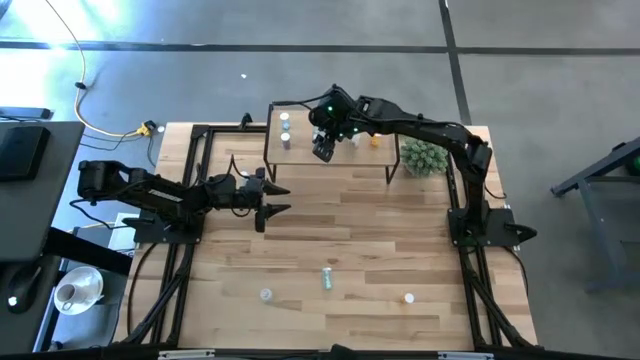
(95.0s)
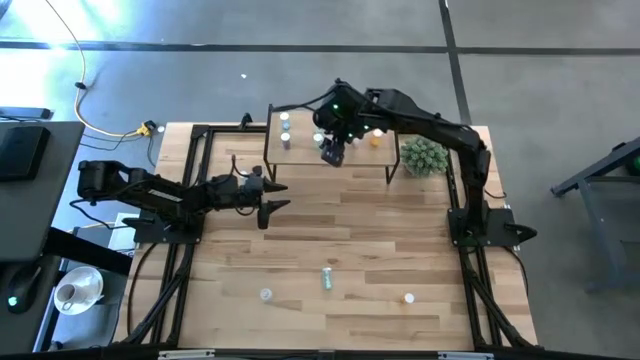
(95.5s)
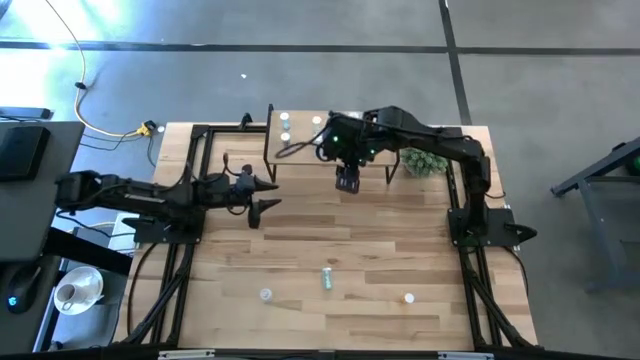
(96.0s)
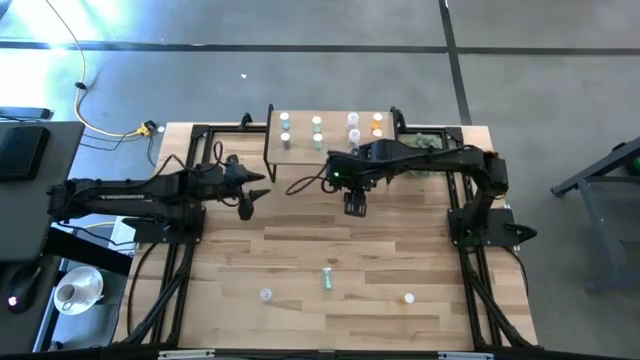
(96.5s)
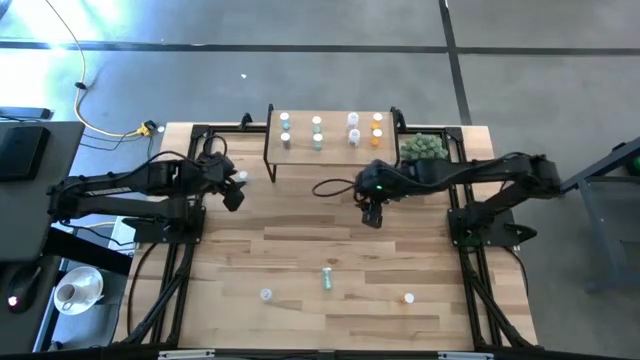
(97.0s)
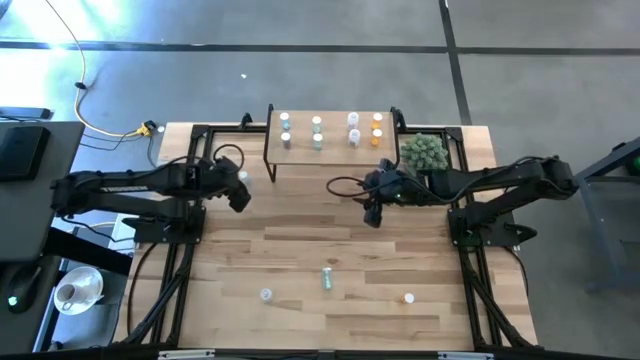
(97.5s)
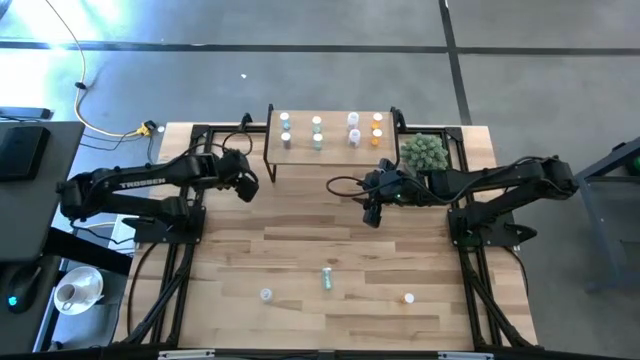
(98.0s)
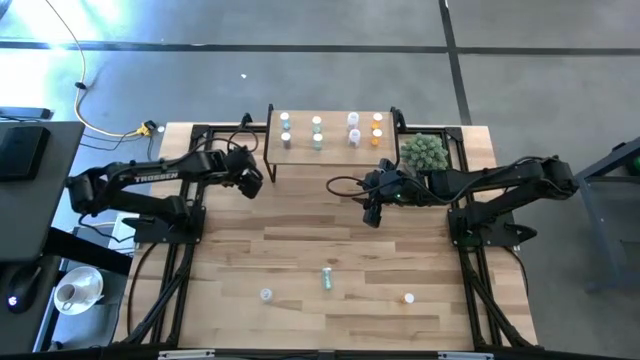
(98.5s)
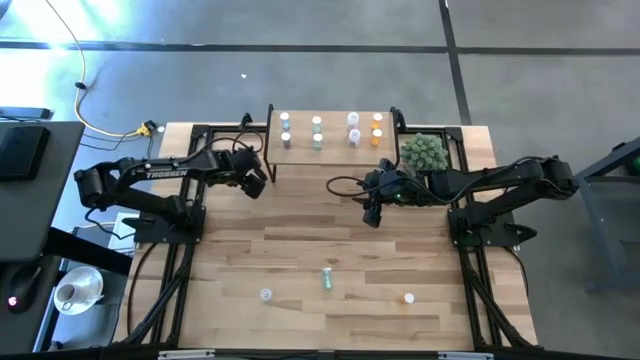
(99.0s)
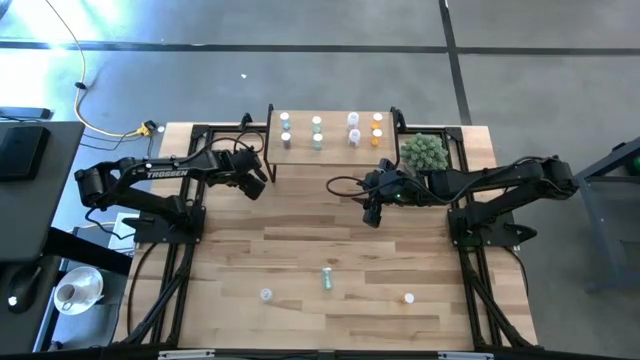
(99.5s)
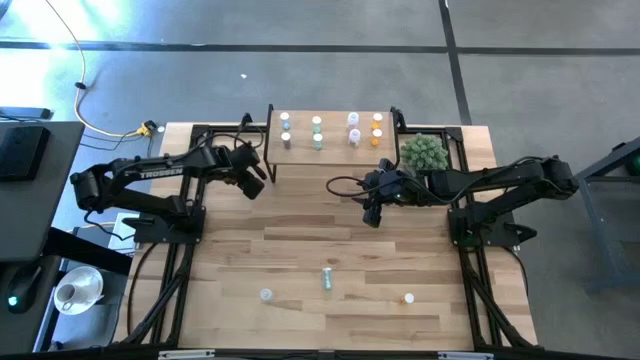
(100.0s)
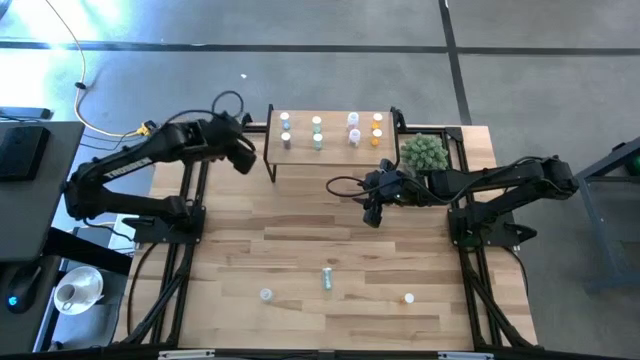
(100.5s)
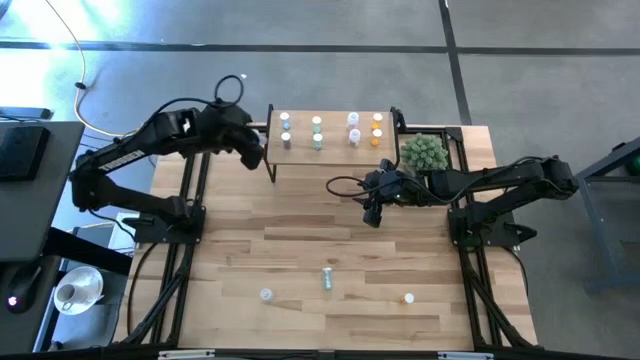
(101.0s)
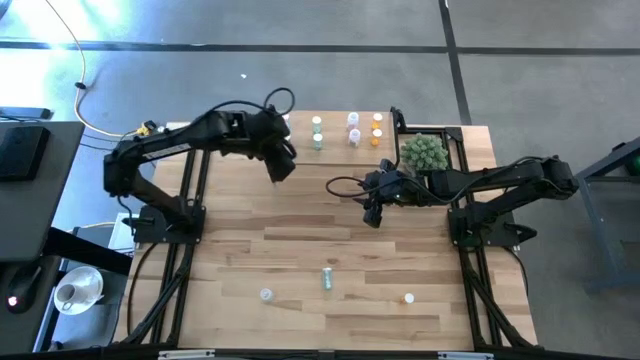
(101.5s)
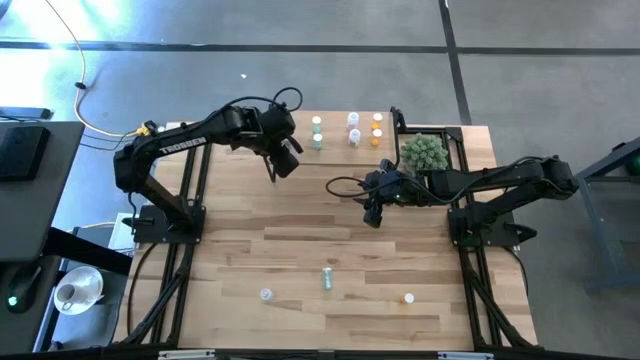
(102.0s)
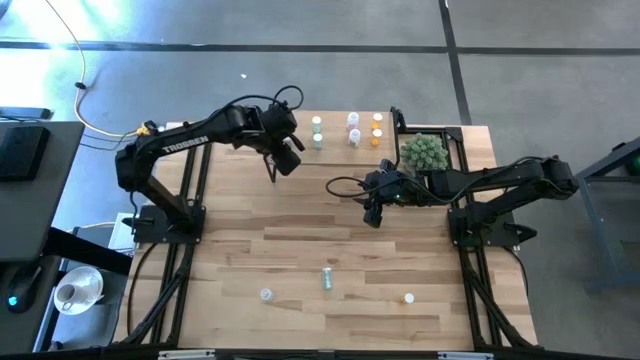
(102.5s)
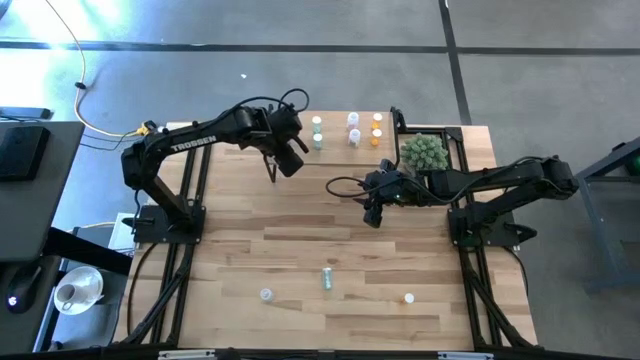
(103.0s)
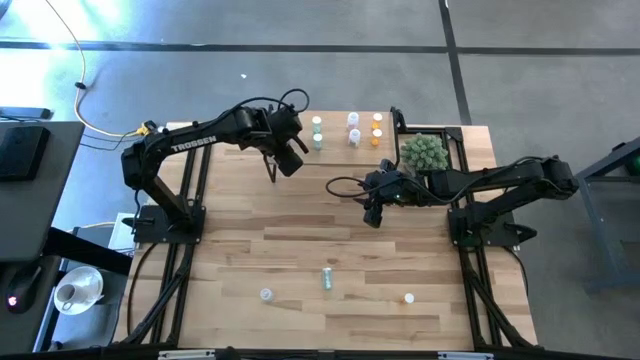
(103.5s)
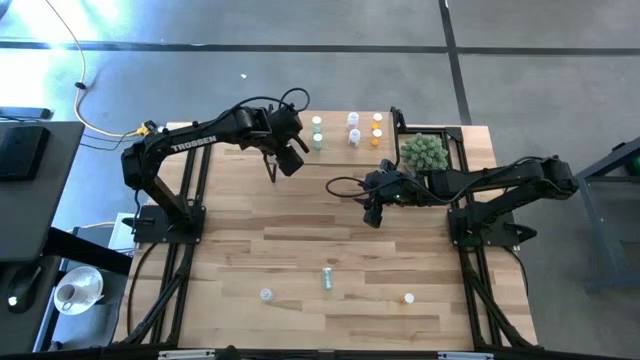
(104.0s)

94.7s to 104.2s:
Task: Pick and place medicine bottles onto shelf by color
Put the blue pill bottle on the shelf aligned with the other blue pill bottles

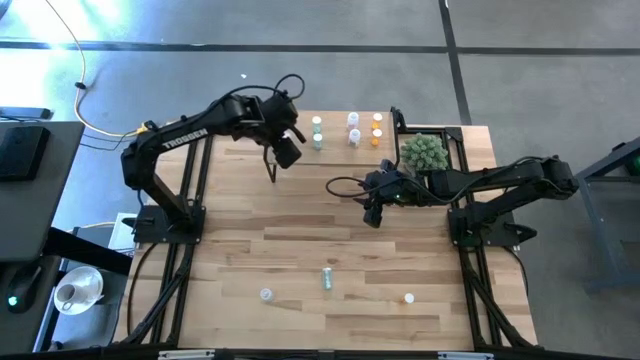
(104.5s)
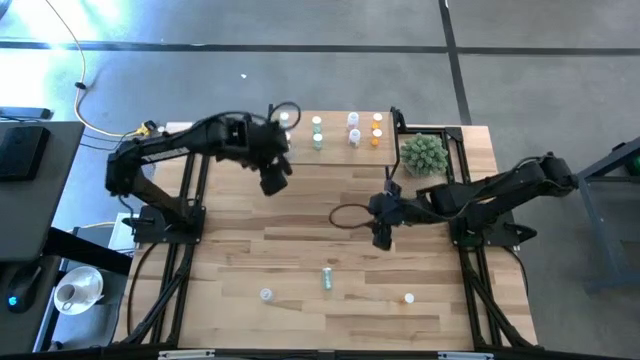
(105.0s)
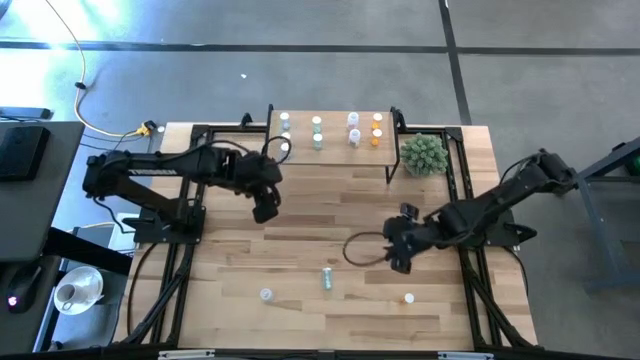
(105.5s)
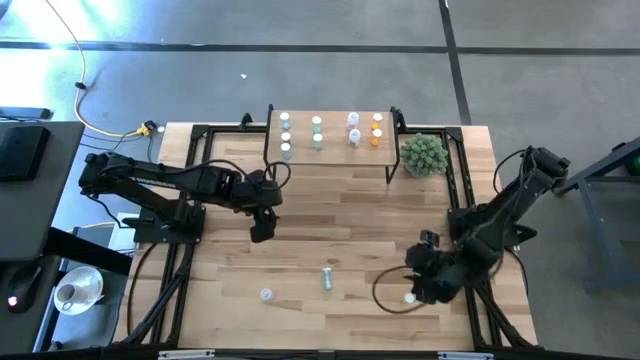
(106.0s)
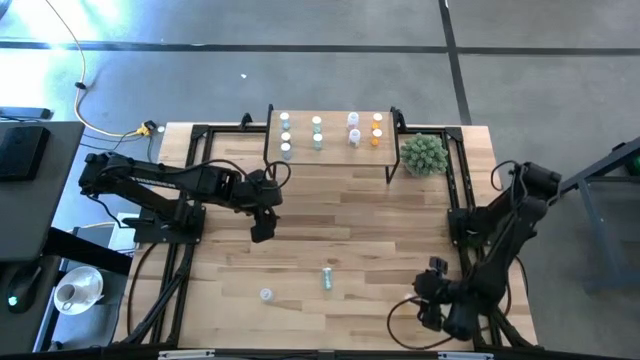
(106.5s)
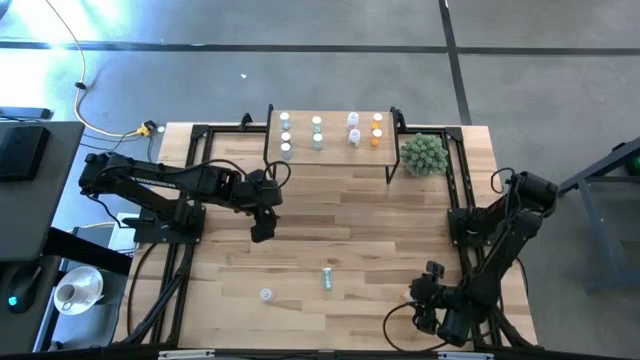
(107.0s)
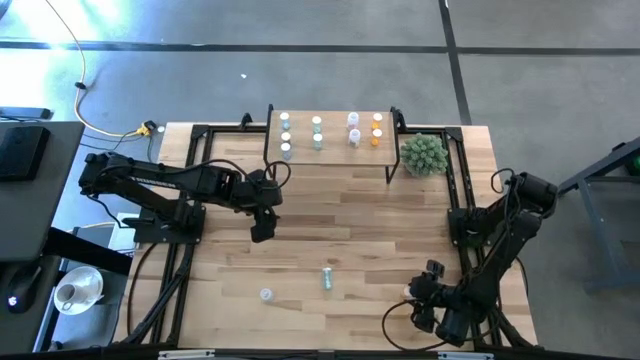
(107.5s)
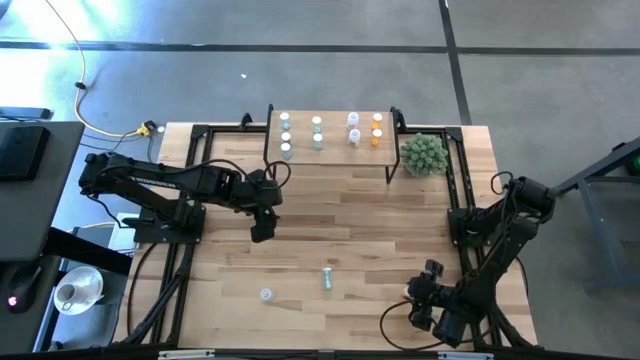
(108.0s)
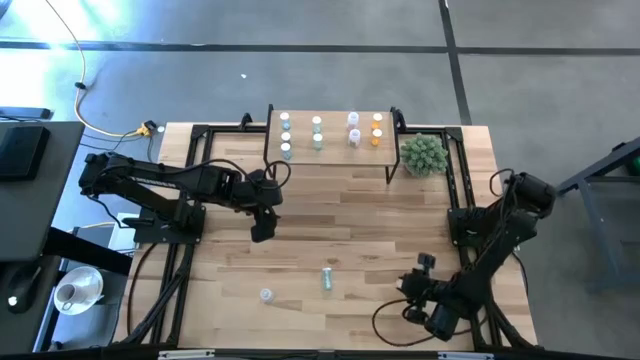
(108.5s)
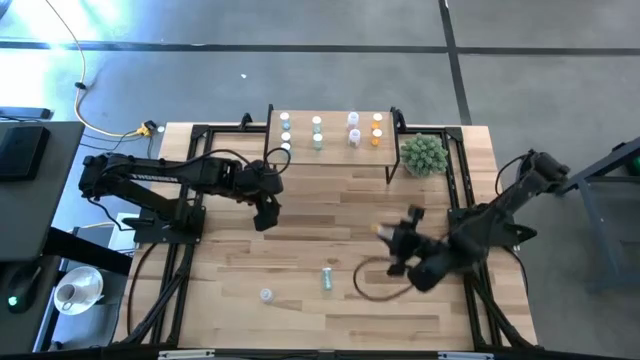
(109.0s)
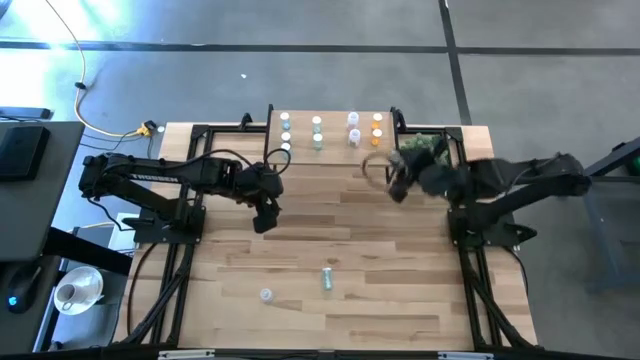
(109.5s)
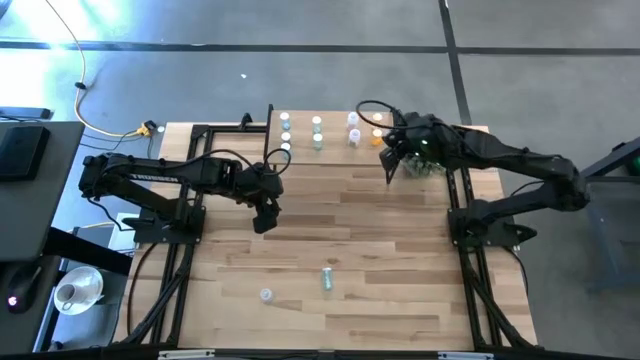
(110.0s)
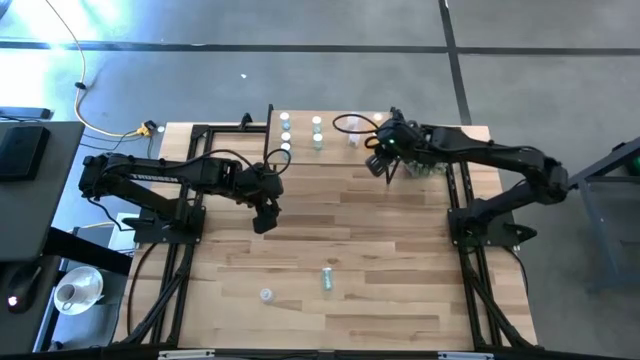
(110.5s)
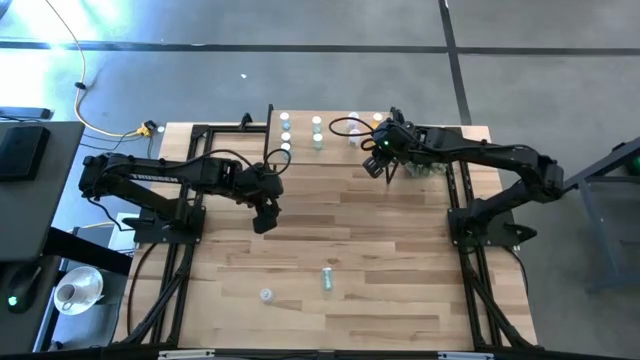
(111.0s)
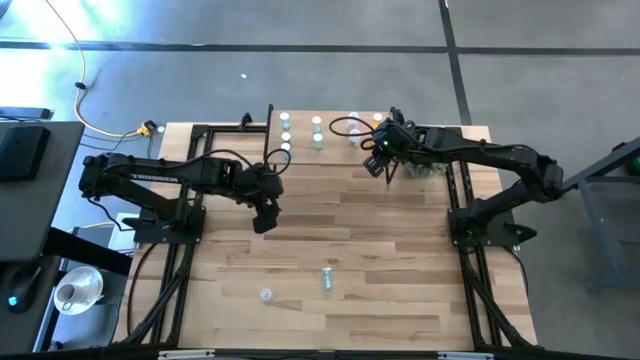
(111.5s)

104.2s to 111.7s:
Put the orange pill bottle on the shelf aligned with the other orange pill bottles

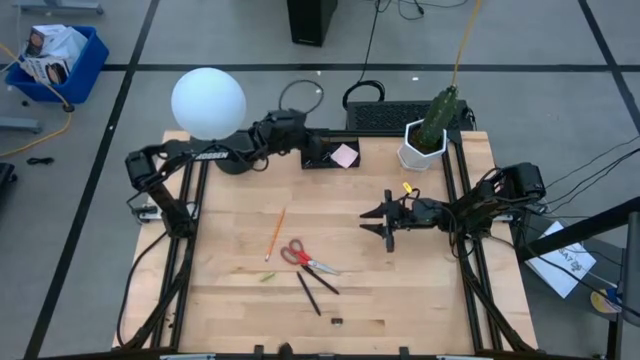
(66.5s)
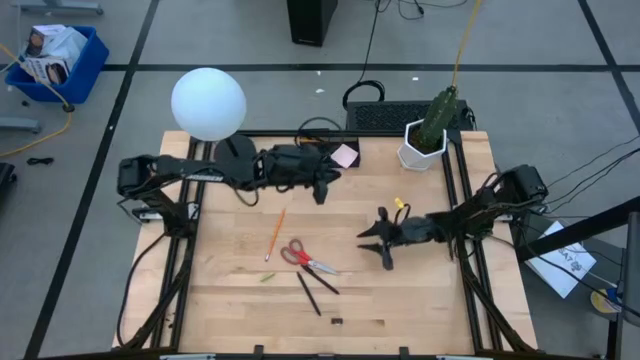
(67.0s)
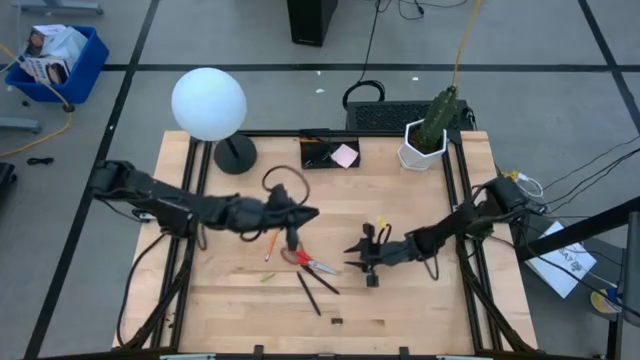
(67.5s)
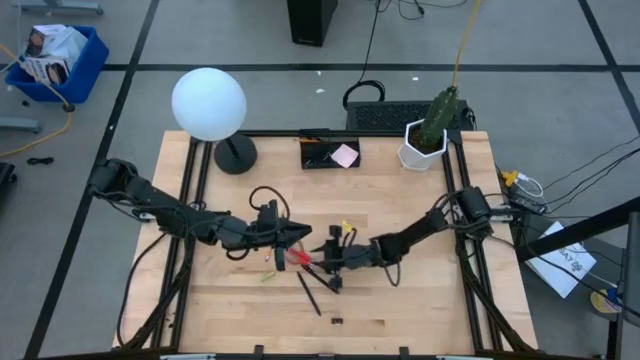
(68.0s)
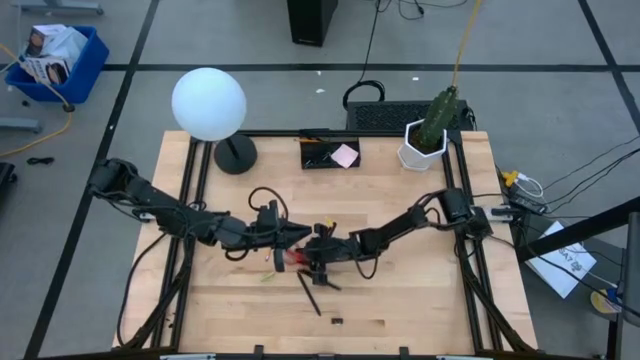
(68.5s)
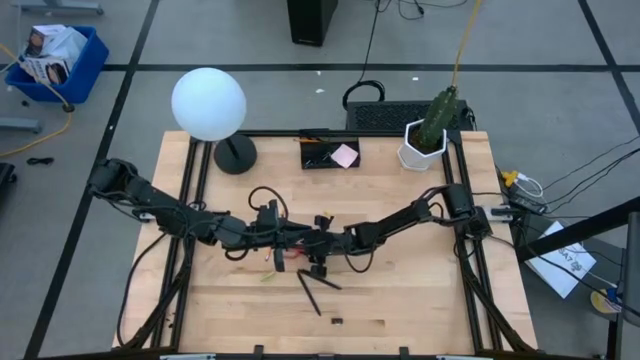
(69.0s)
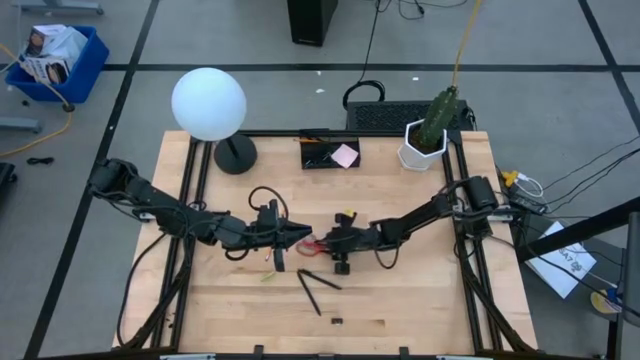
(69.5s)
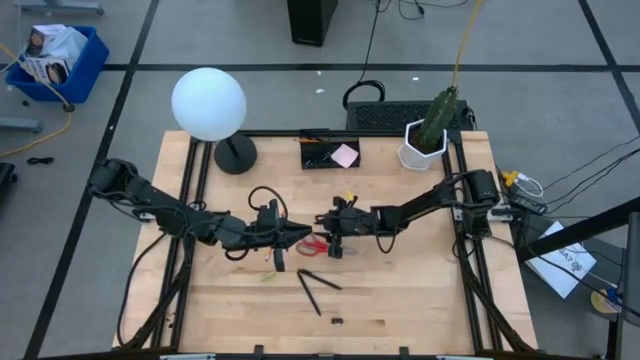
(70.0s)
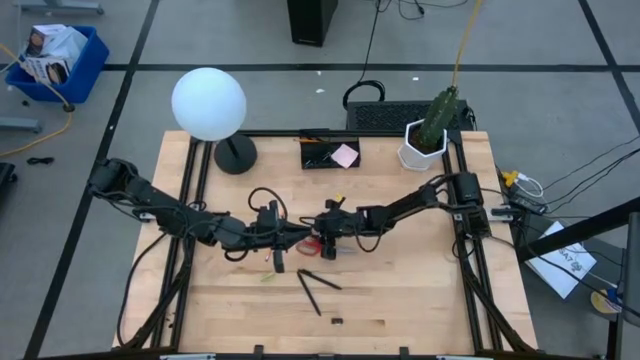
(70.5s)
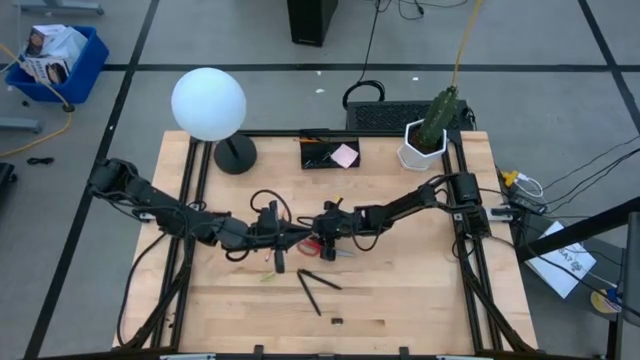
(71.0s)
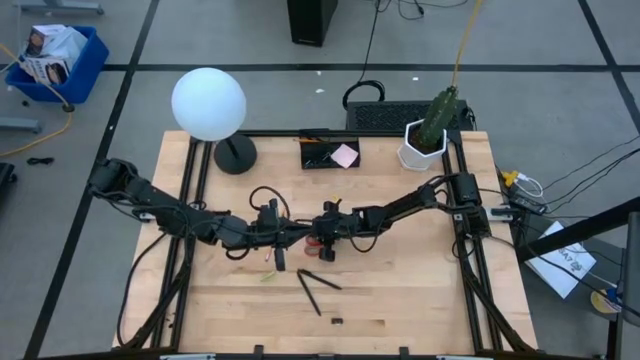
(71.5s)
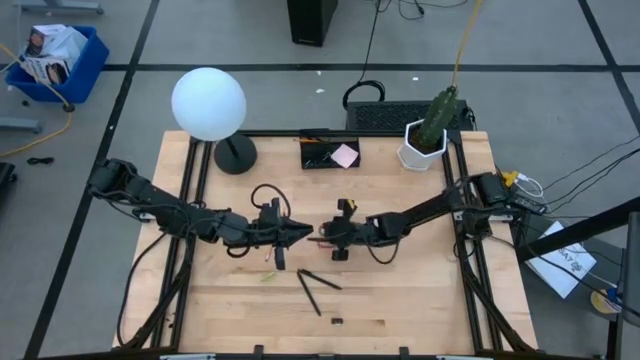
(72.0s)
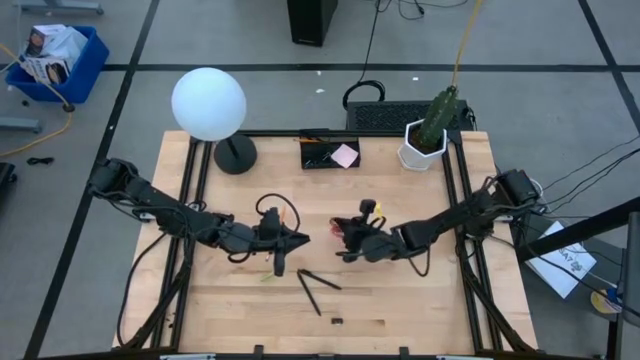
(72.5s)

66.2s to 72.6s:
Task: Pick and place office supplies into organizer
Put the scissors into the desk organizer
